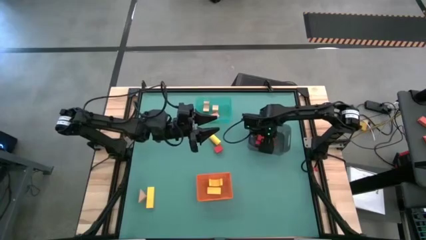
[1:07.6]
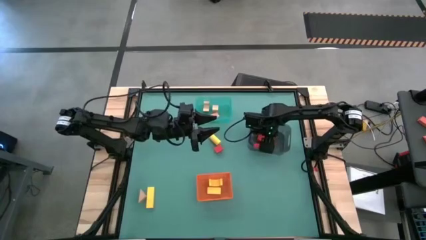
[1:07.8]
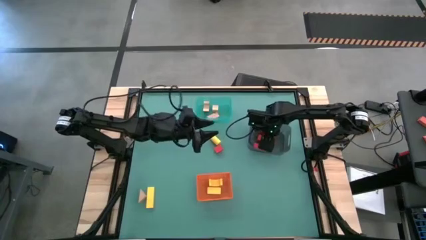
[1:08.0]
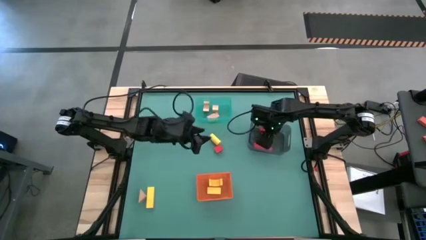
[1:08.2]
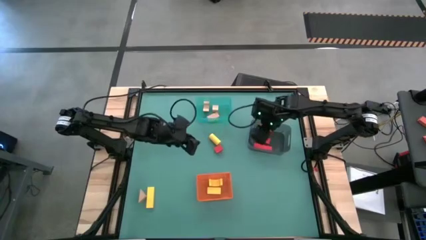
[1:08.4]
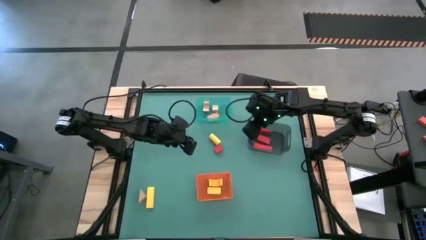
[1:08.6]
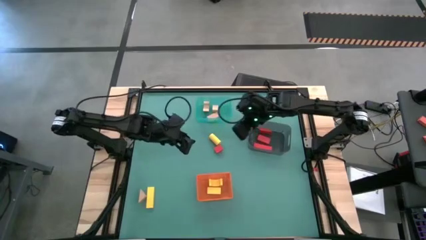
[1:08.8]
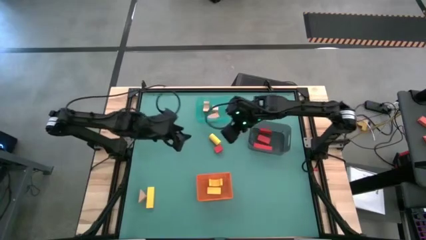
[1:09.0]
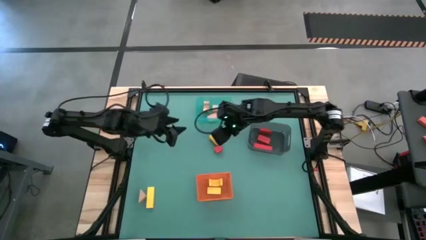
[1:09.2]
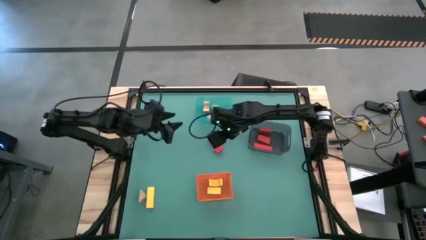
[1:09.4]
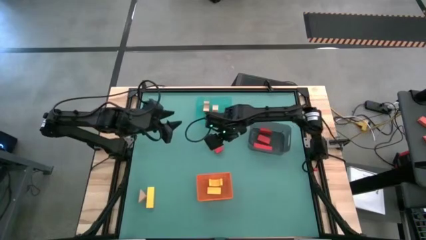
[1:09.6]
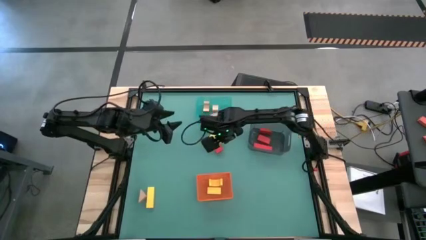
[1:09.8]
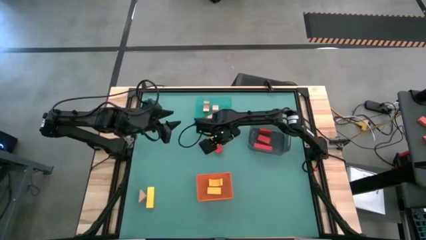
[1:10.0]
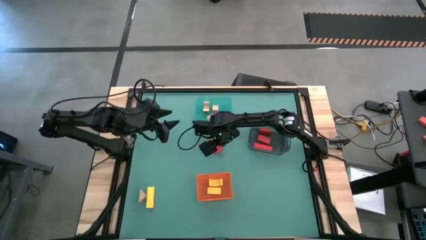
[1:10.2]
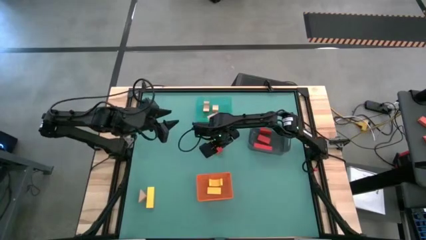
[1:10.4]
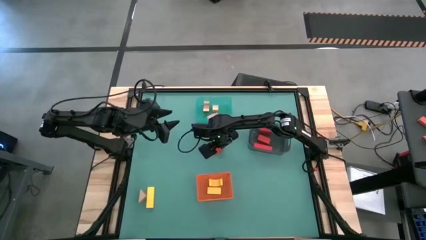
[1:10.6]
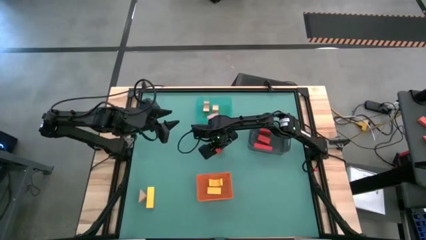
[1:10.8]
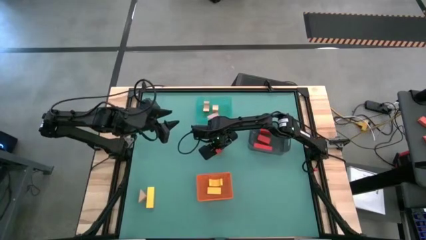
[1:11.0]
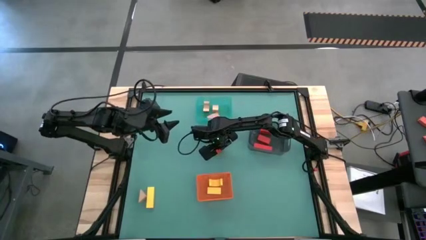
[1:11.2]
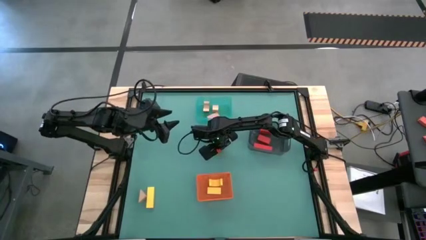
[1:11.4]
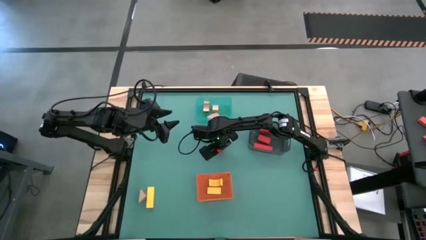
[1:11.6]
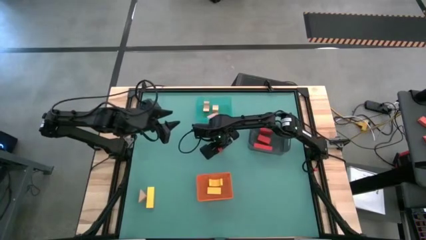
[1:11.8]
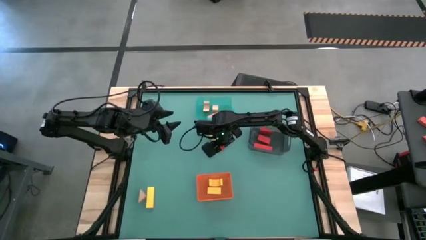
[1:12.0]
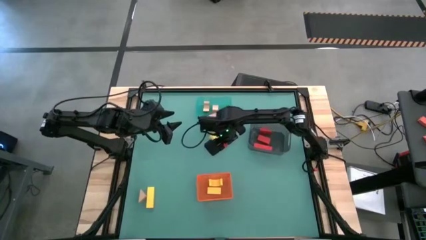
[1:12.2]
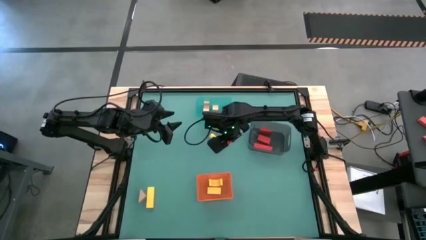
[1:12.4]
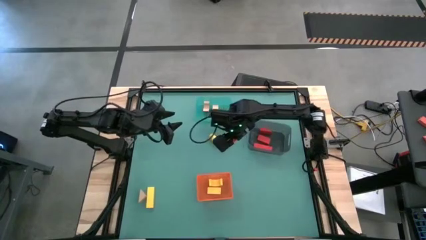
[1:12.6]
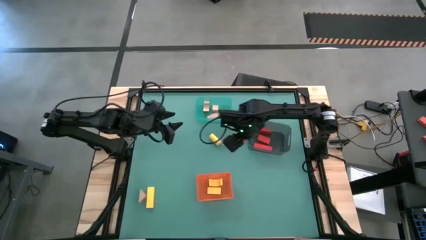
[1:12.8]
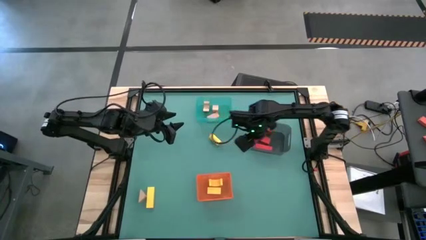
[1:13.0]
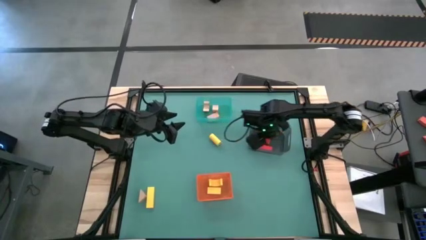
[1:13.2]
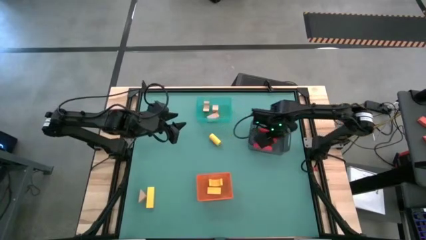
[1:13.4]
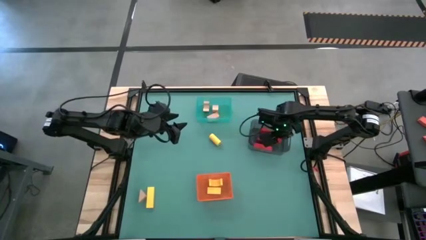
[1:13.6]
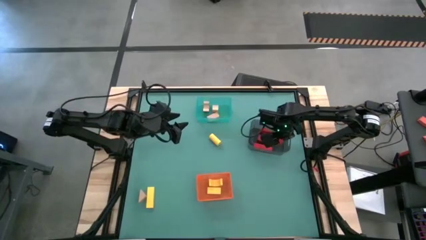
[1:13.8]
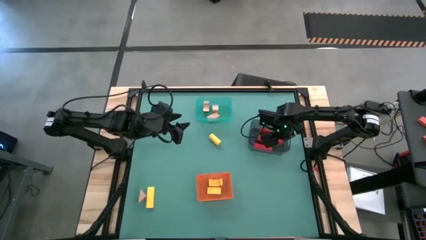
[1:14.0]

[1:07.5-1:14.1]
Task: Sort & place blocks by color
Put the red block into the black bin

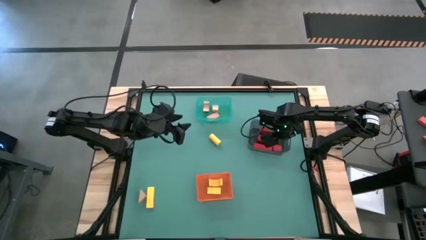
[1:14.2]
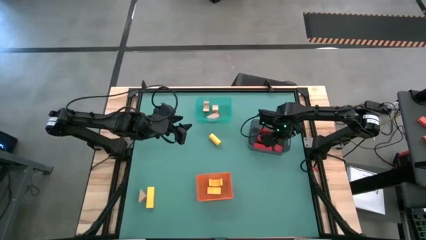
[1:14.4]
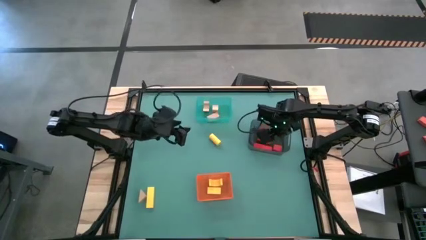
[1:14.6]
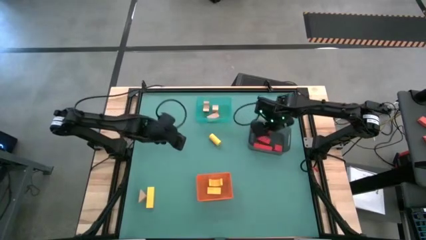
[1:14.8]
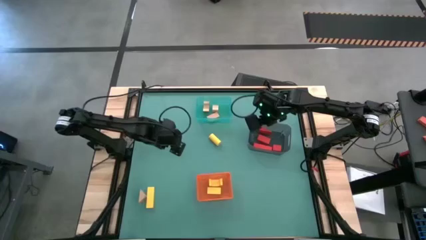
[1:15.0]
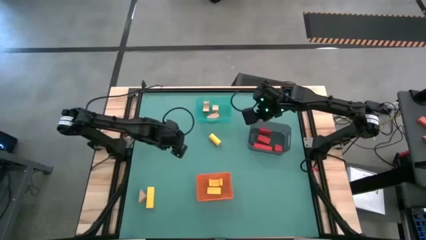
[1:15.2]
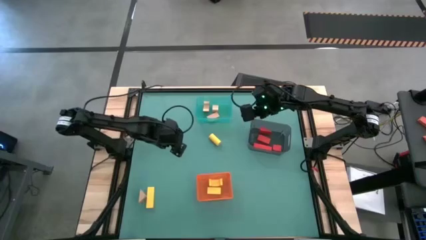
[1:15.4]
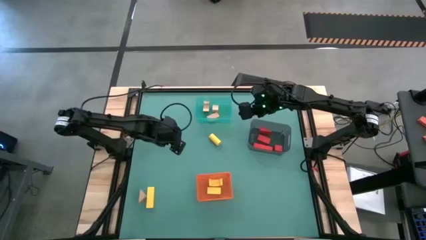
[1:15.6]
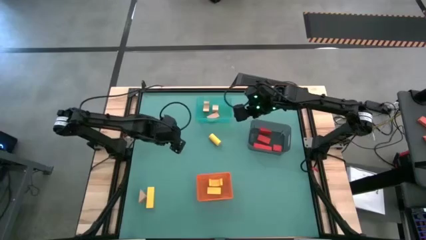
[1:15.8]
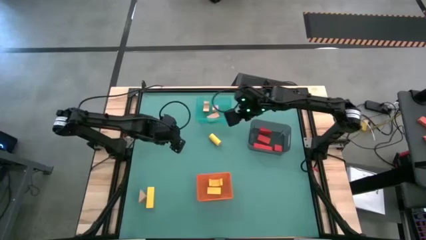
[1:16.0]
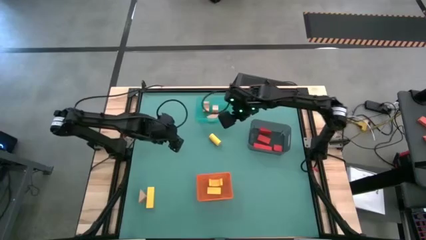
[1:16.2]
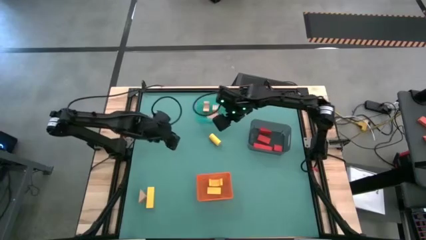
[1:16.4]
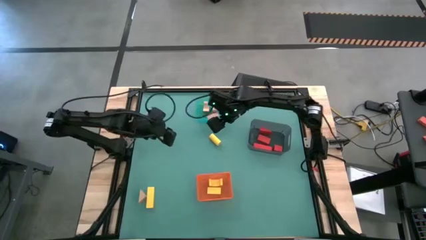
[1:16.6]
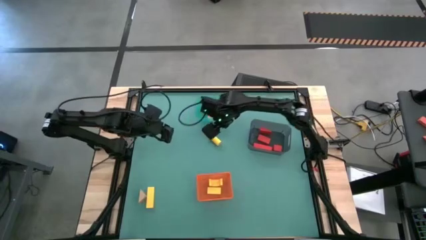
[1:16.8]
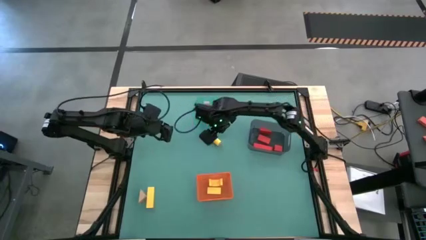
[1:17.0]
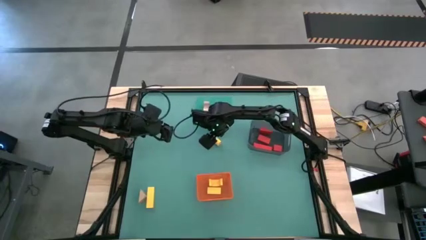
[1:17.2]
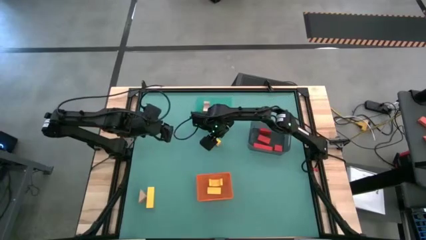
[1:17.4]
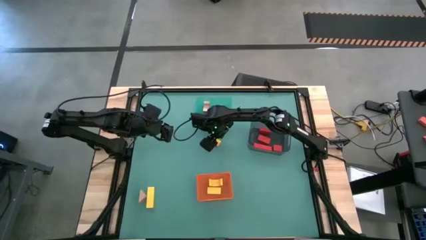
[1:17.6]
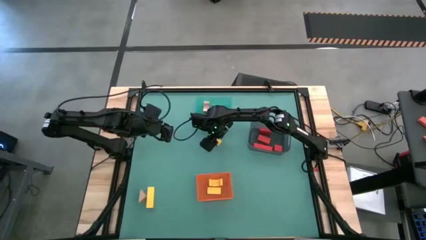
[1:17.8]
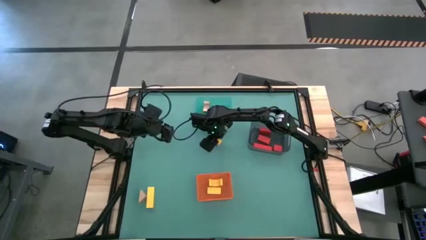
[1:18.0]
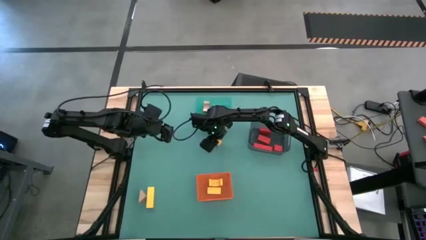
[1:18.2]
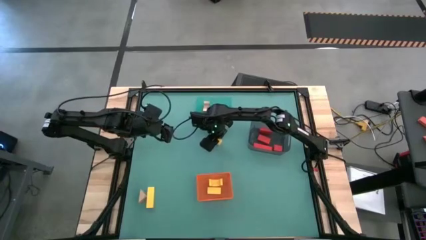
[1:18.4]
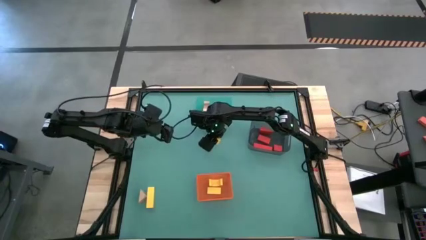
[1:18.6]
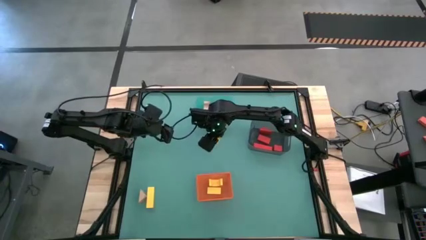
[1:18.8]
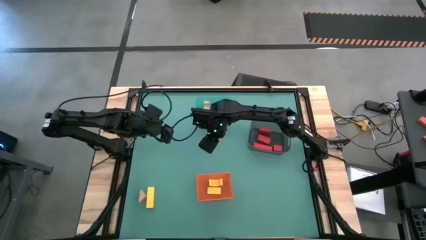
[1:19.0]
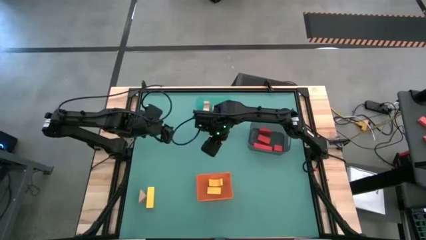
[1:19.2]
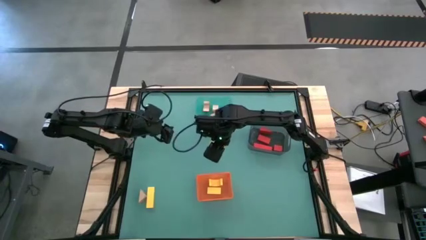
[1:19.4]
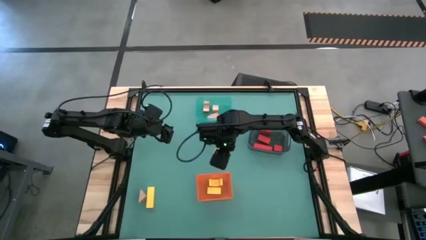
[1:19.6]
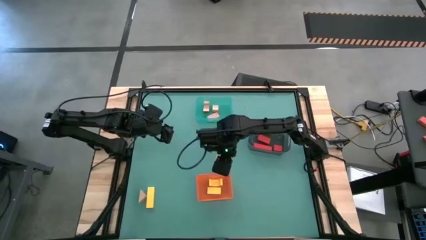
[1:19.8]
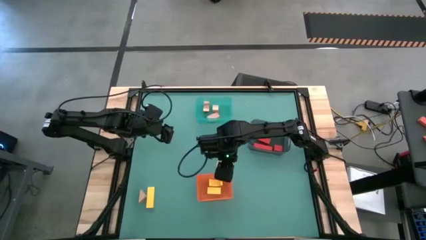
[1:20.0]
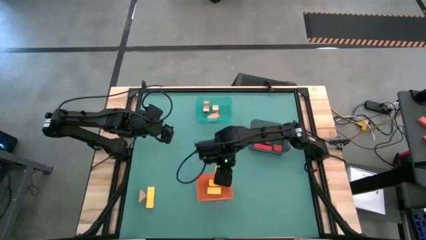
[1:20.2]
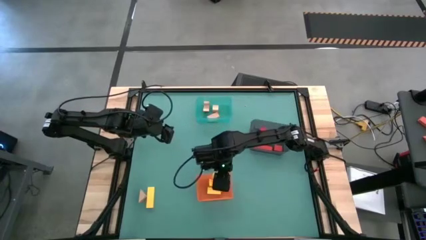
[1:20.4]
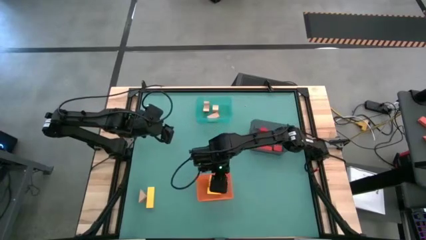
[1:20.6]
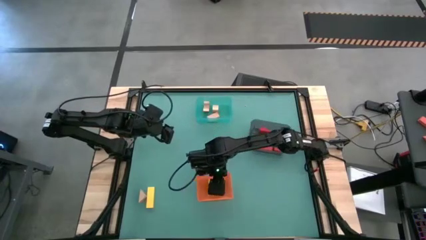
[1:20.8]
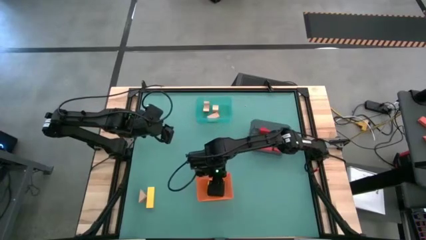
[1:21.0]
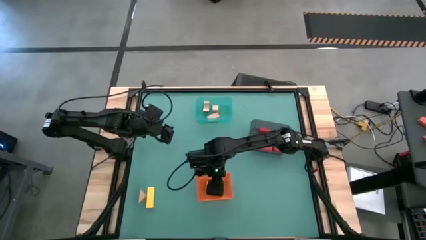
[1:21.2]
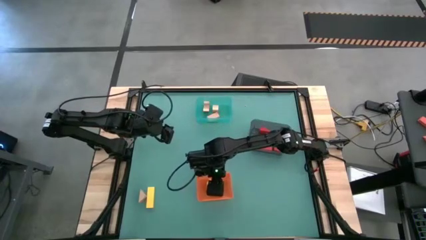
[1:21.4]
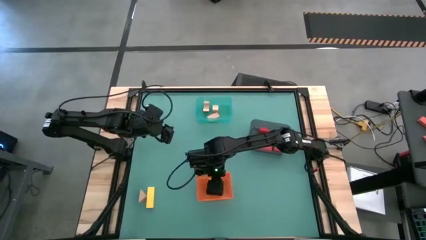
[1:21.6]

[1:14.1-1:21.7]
Put the yellow block into the orange bin
